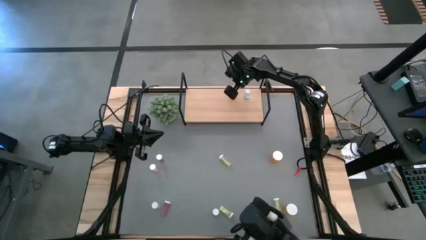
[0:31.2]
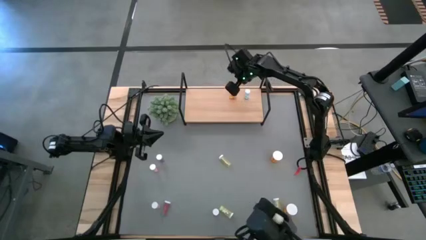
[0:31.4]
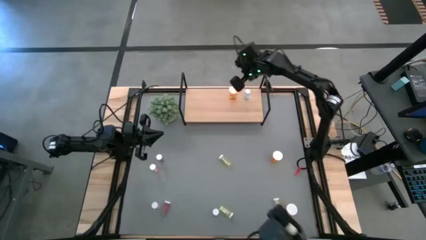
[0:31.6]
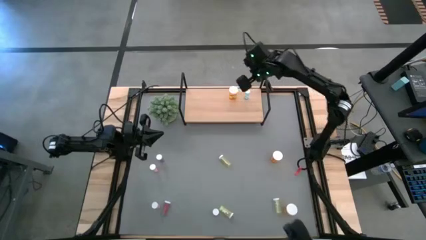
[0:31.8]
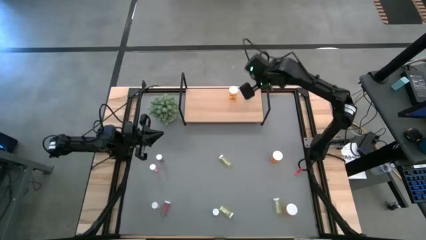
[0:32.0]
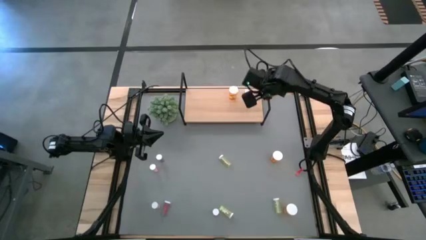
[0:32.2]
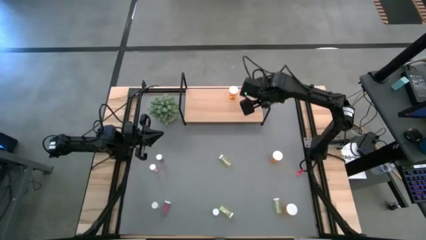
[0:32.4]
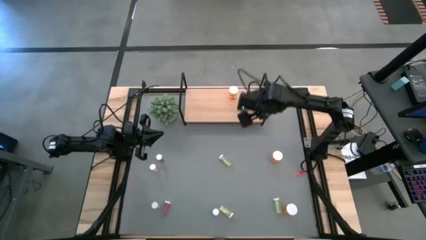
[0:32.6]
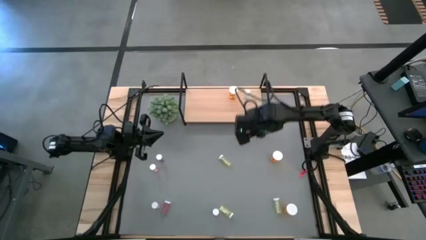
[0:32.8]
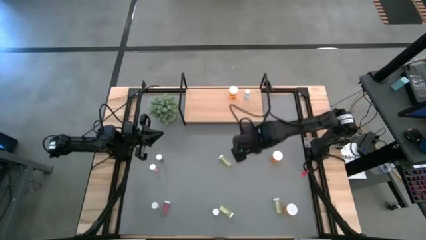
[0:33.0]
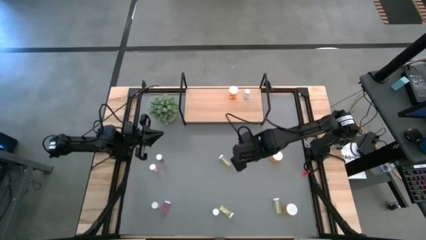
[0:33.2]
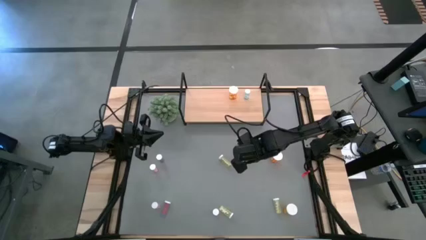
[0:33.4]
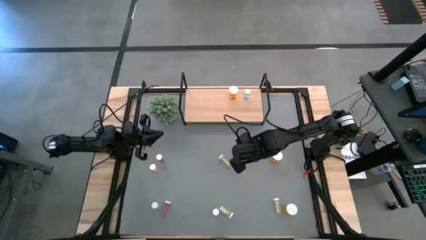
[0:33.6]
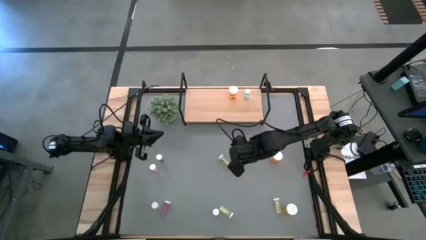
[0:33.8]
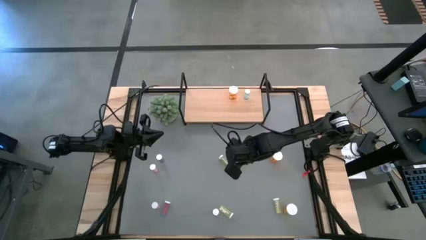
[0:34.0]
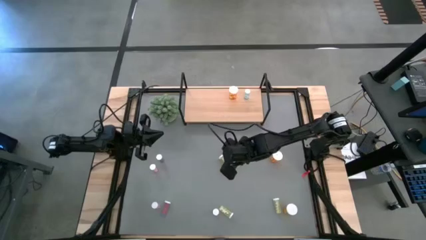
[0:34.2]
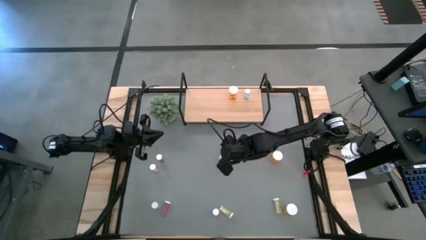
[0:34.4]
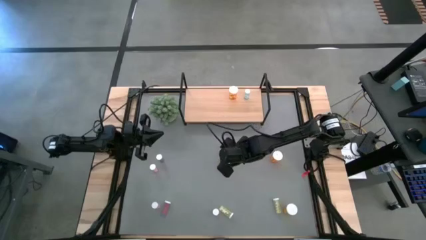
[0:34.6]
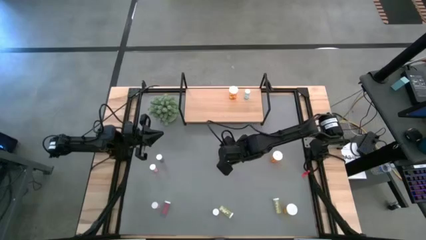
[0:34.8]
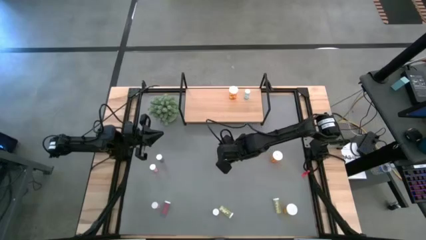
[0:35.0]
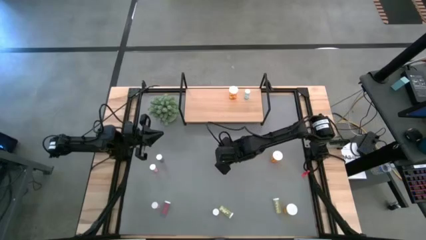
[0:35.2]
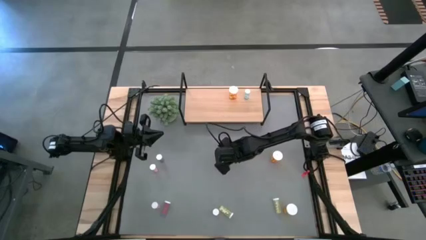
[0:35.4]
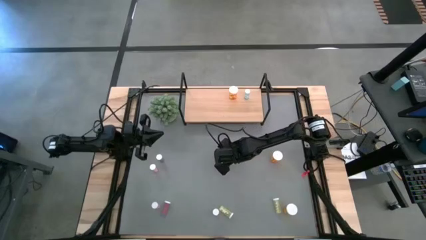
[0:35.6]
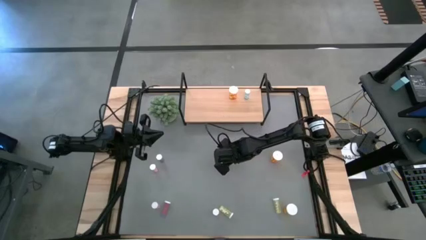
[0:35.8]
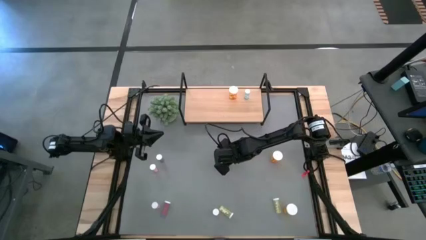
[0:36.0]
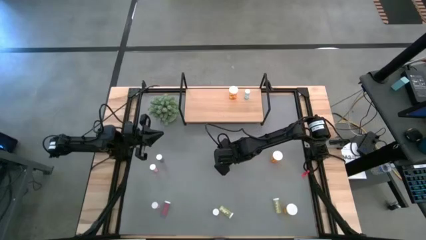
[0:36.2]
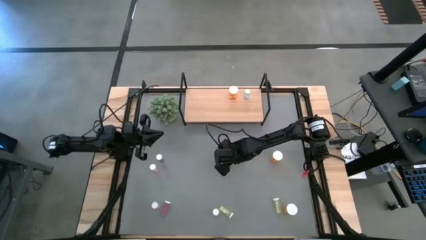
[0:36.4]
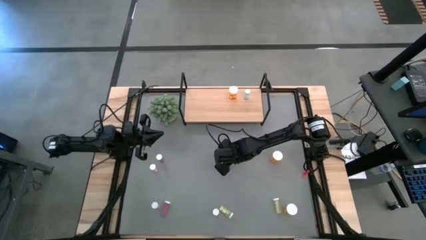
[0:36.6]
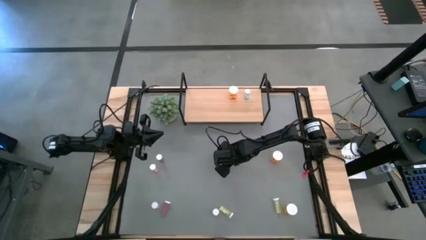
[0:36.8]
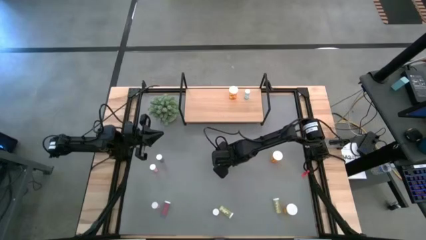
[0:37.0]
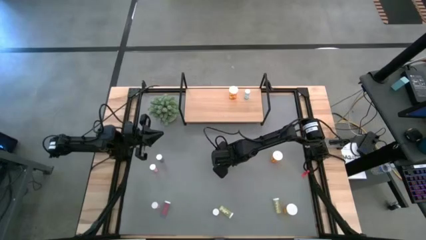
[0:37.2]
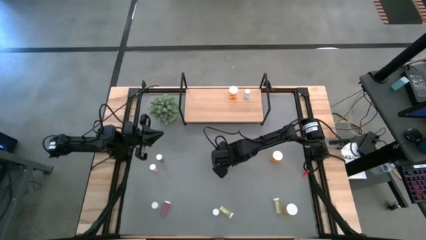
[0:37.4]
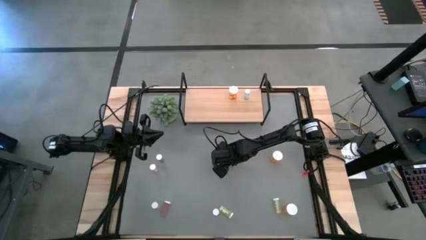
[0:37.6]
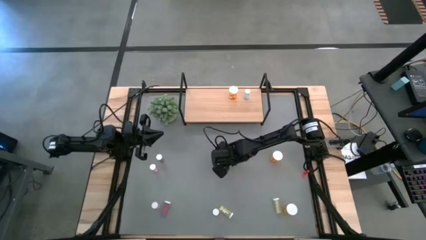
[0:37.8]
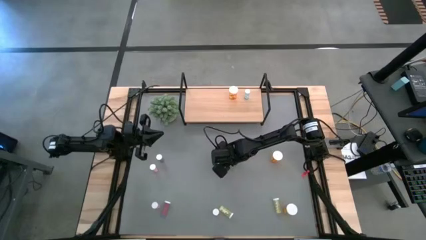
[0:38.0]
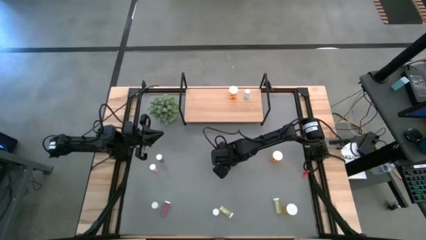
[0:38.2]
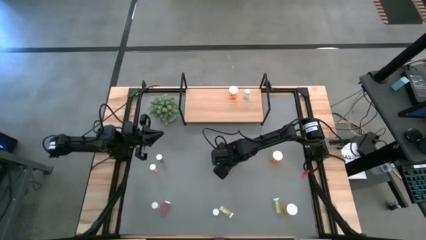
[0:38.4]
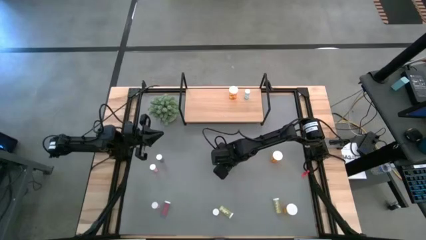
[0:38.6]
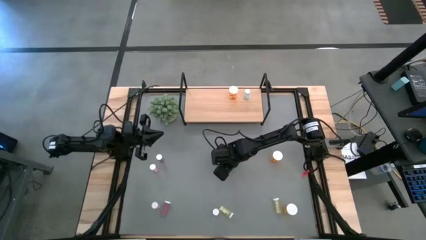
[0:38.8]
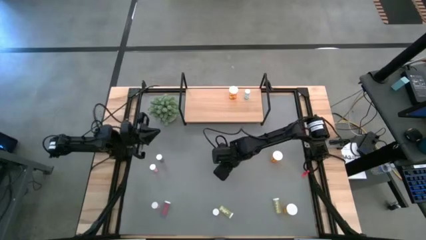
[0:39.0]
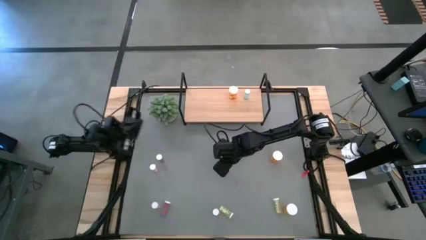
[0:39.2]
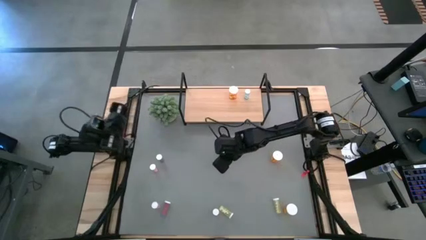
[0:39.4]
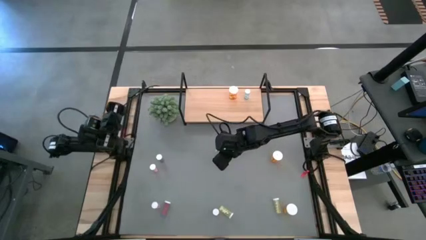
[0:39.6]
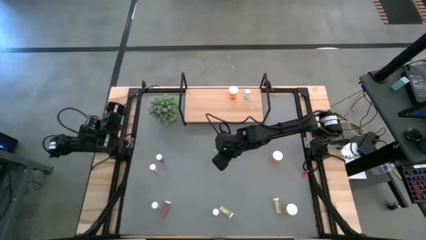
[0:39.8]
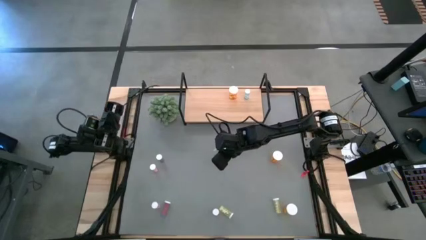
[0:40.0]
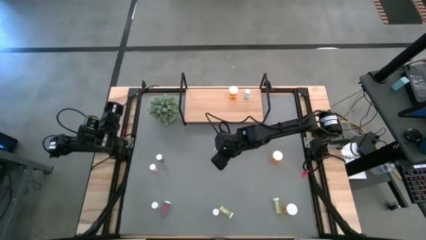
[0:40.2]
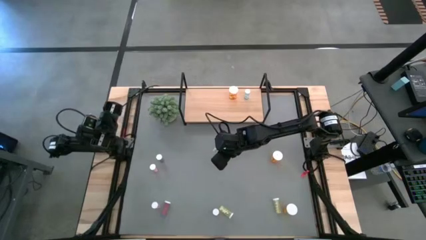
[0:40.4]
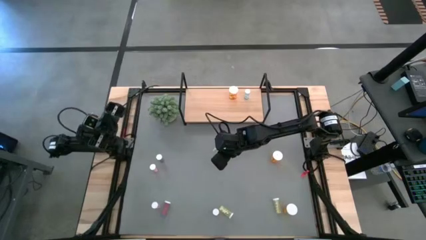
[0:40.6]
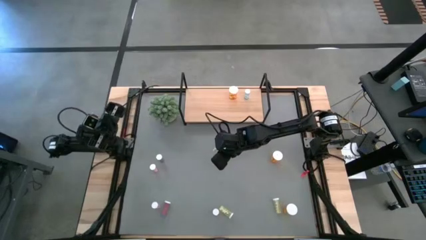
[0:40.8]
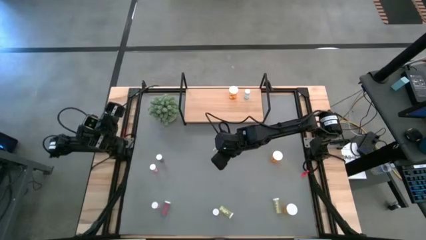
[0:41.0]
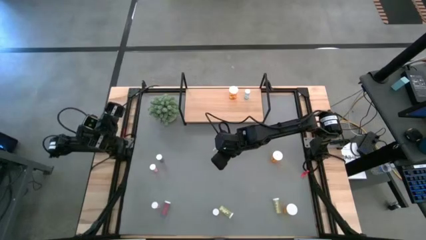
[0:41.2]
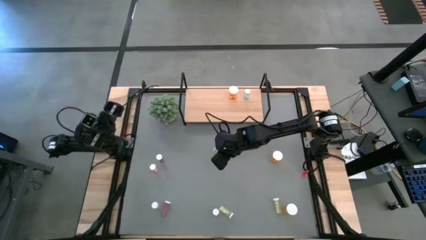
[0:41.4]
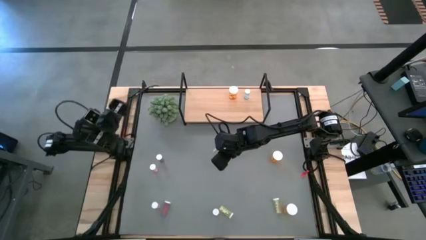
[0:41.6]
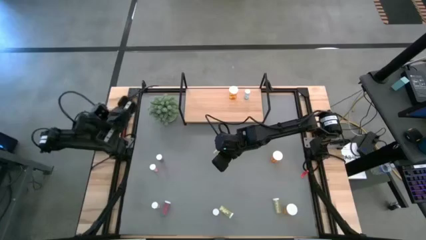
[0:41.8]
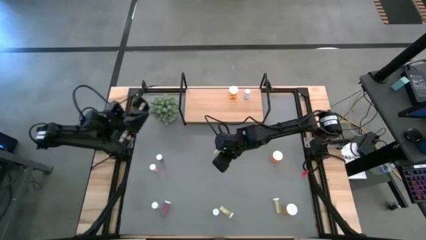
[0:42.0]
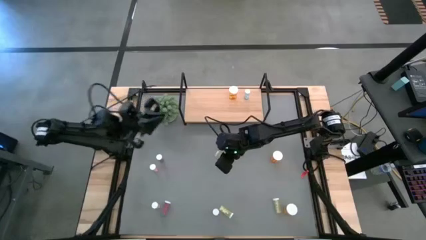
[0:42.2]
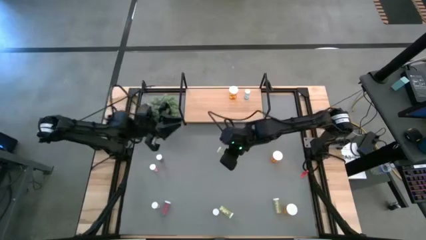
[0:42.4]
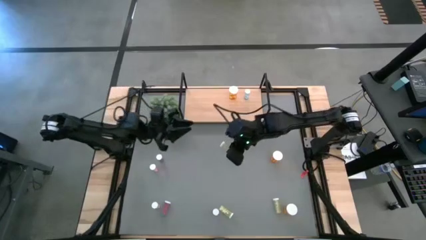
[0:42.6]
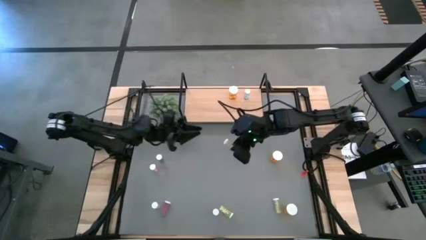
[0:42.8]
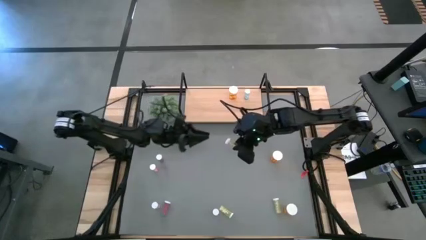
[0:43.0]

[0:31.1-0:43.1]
Task: Pick and place medicine bottles onto shelf by color
Put the top yellow pill bottle on the shelf

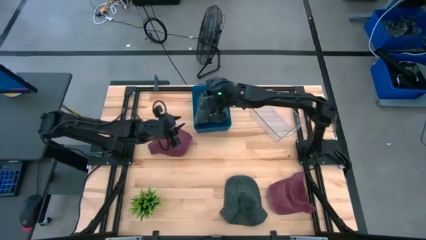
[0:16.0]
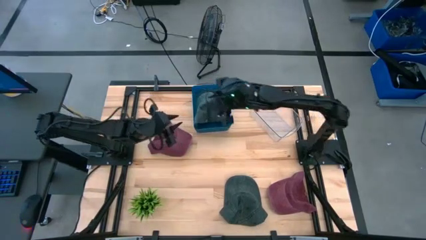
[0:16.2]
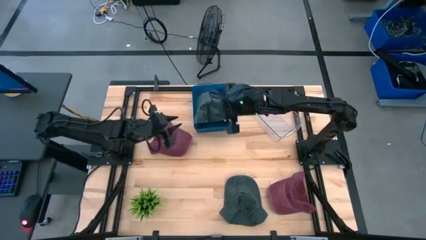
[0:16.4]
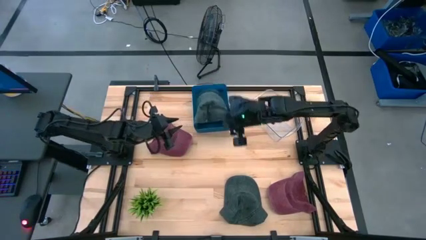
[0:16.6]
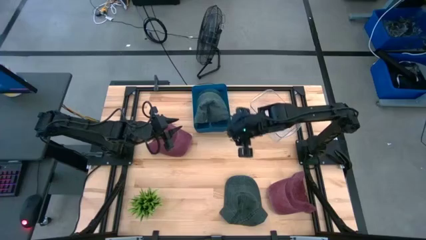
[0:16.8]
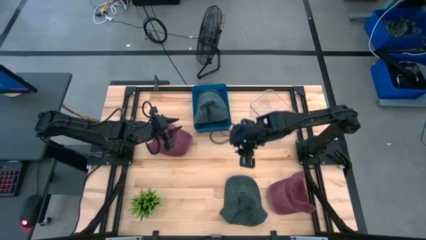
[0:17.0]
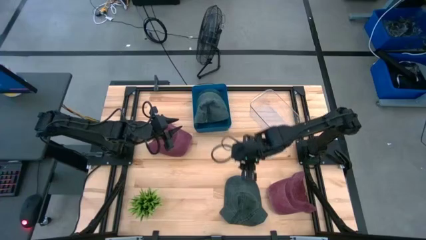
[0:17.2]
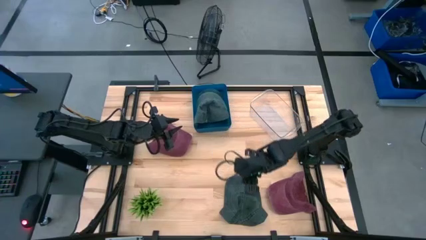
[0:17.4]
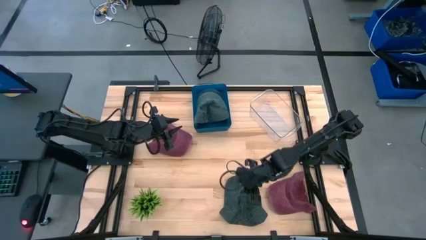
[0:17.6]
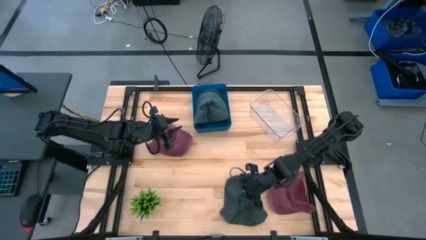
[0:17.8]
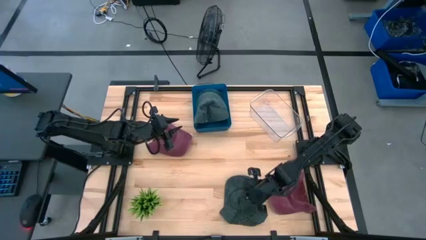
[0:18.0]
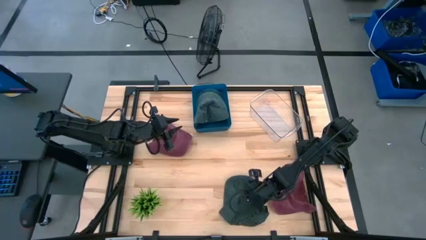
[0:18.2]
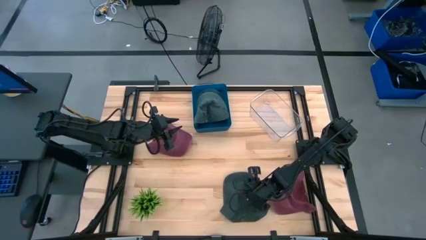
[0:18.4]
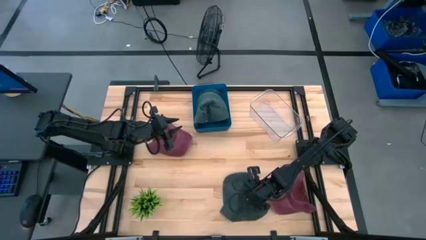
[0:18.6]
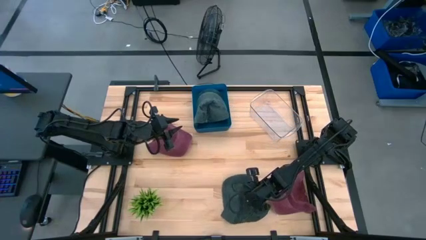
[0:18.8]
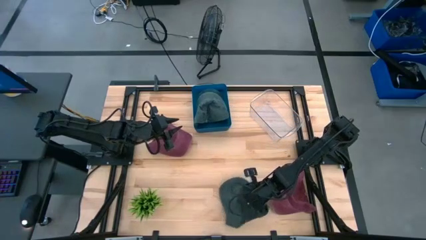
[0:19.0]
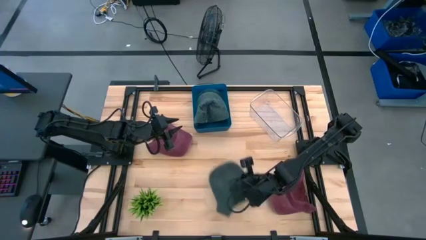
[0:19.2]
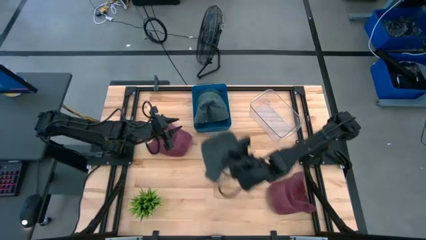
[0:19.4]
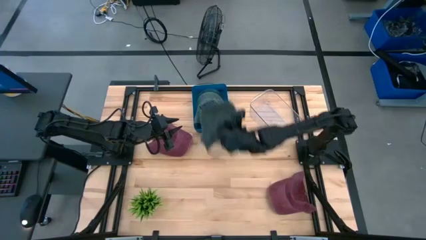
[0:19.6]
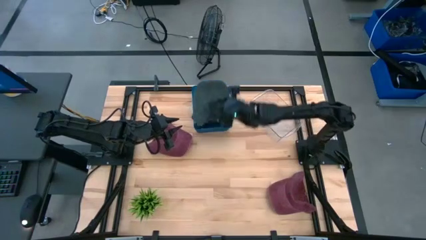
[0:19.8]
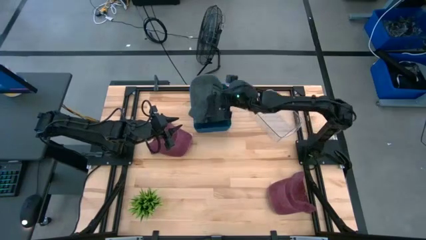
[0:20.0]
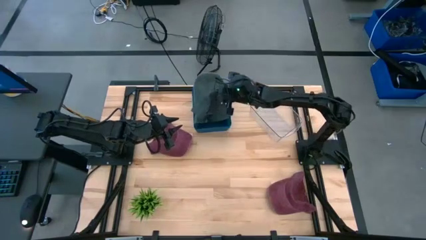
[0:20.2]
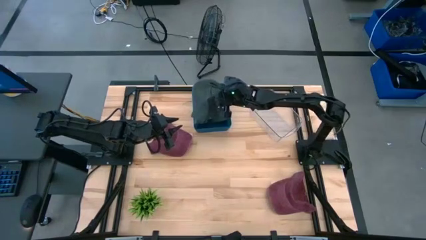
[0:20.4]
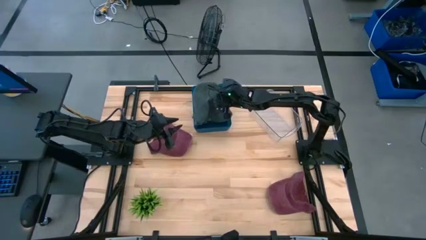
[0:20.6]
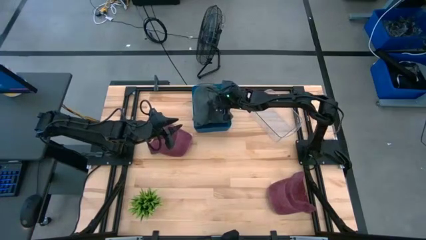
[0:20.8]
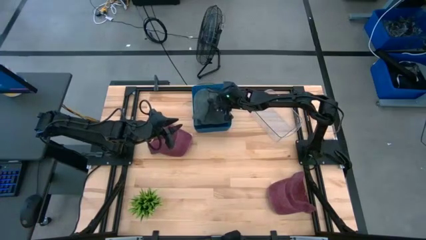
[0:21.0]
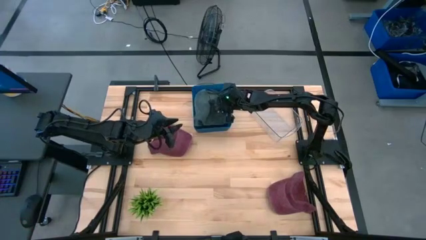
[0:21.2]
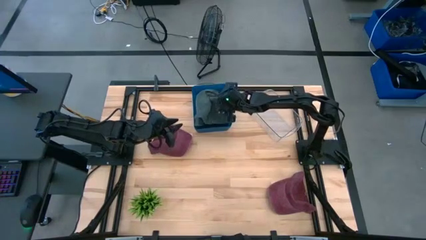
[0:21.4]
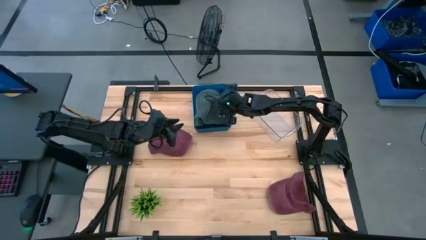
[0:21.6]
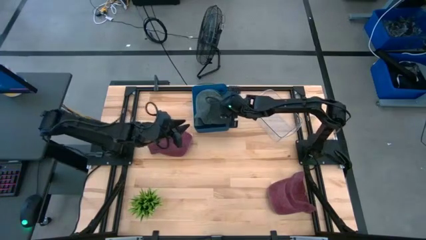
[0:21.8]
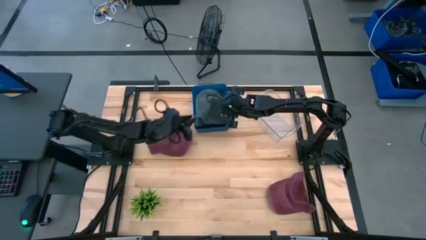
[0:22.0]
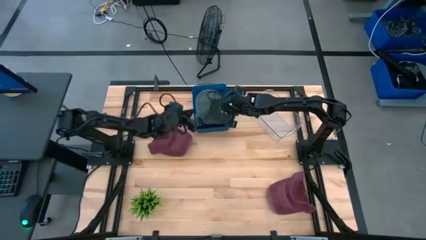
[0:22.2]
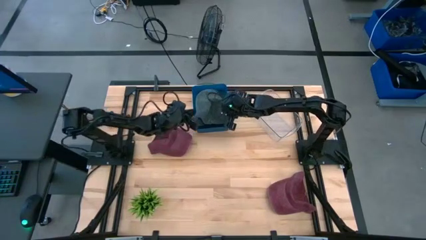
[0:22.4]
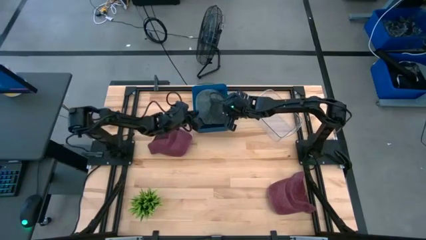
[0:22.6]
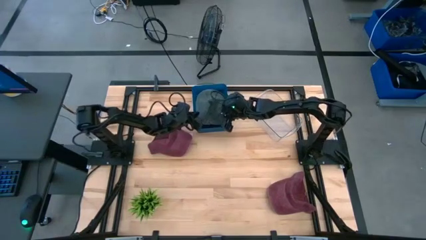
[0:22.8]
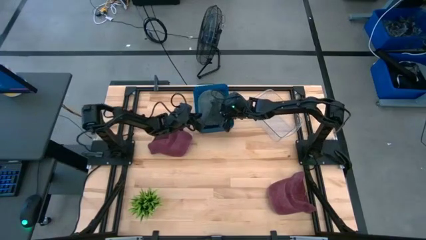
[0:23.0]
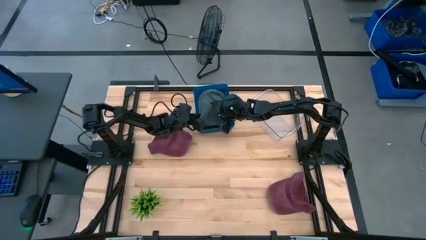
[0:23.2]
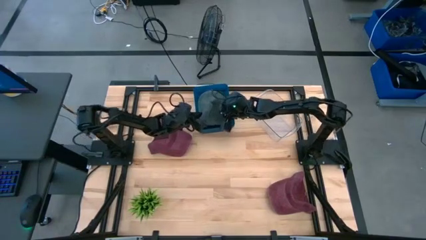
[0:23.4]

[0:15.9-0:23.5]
Task: Pick & Place hat
Put the gray cap into the blue bin
